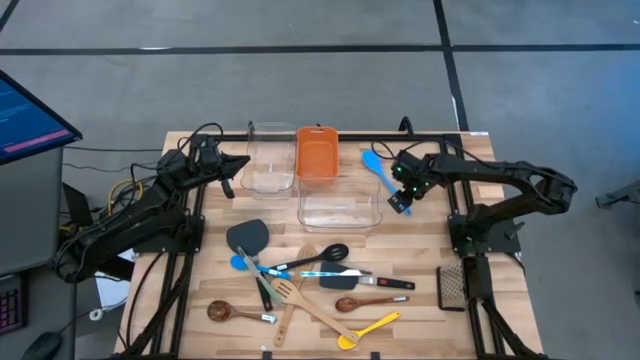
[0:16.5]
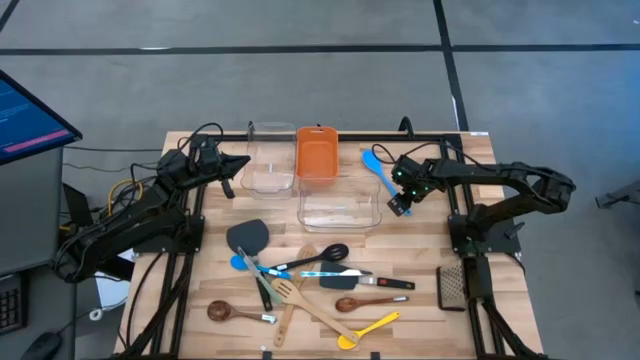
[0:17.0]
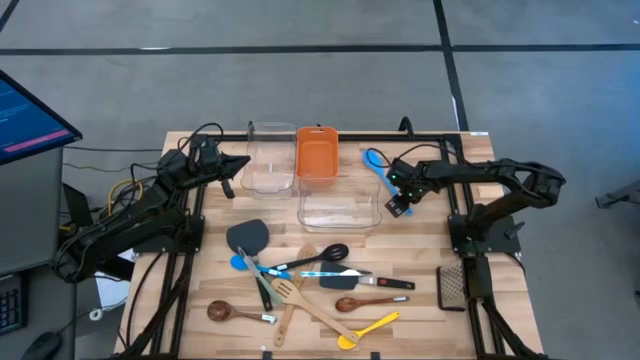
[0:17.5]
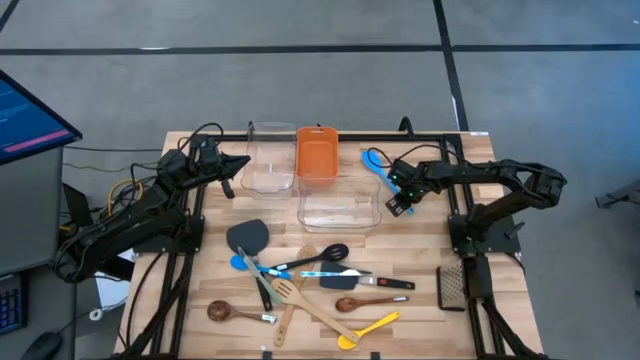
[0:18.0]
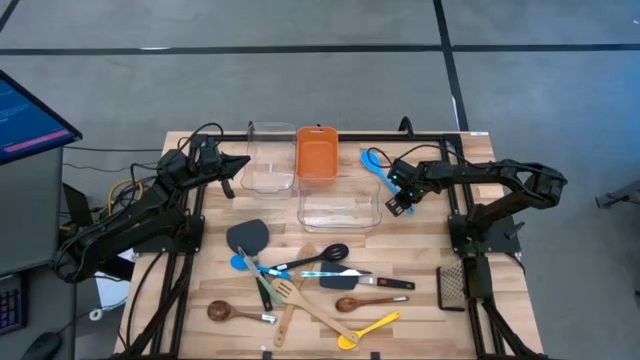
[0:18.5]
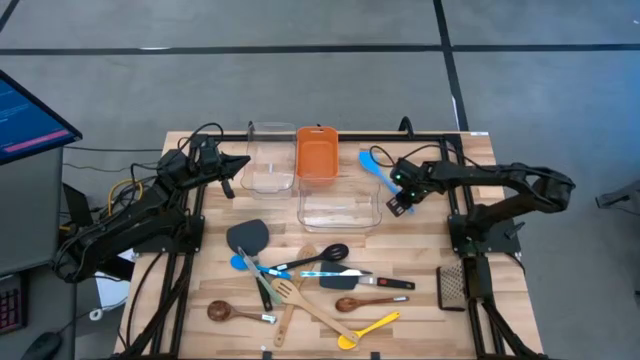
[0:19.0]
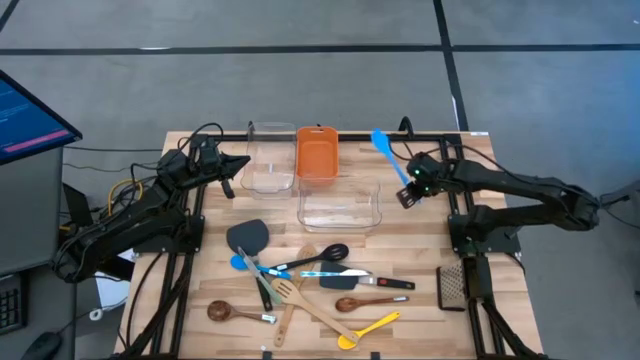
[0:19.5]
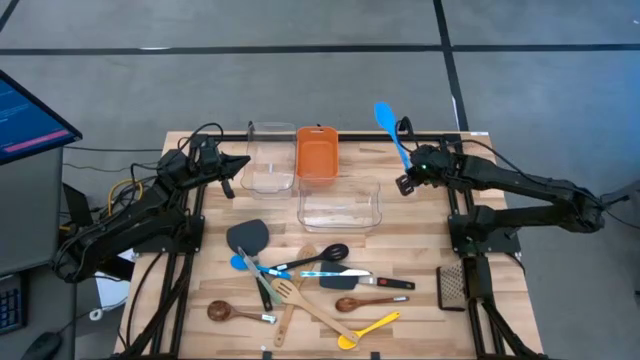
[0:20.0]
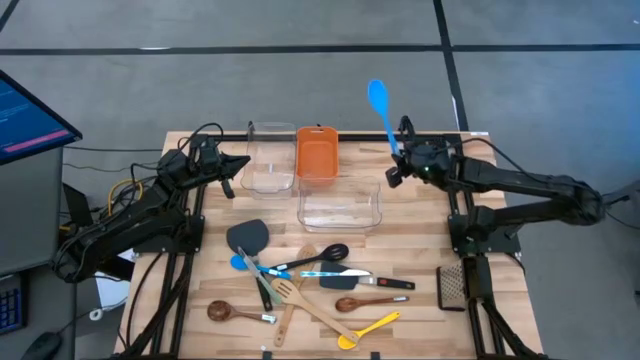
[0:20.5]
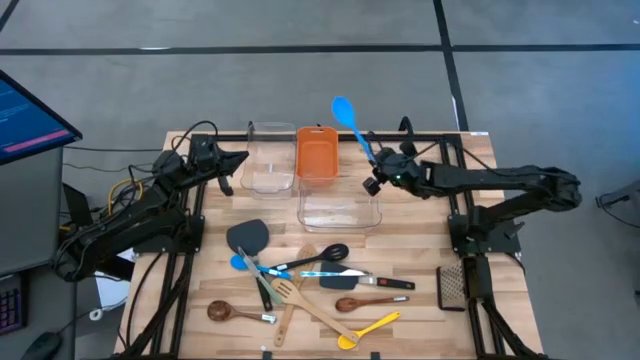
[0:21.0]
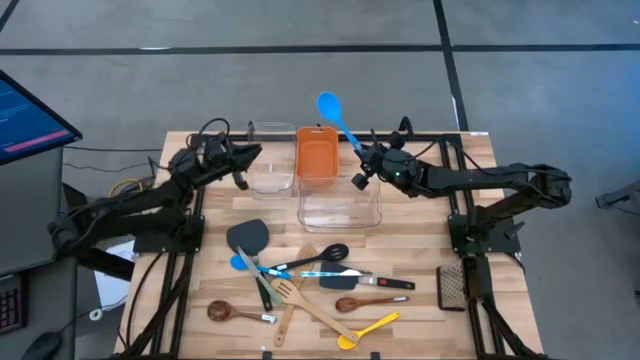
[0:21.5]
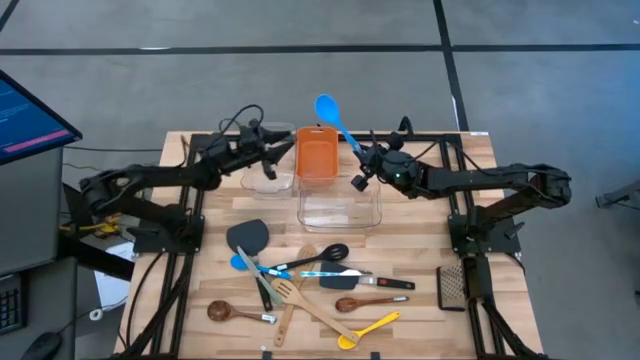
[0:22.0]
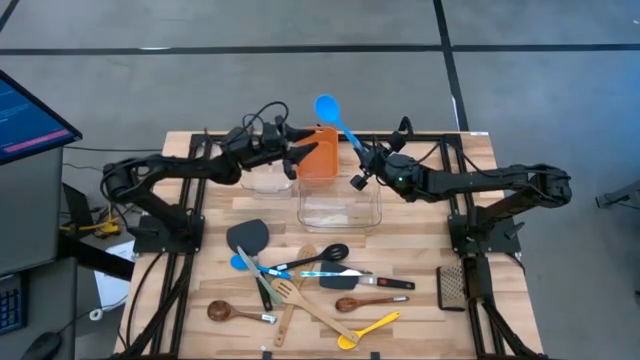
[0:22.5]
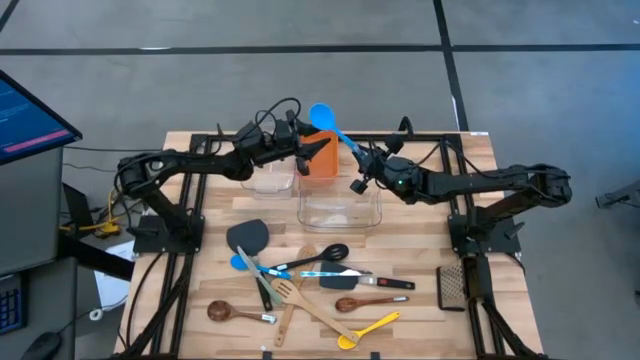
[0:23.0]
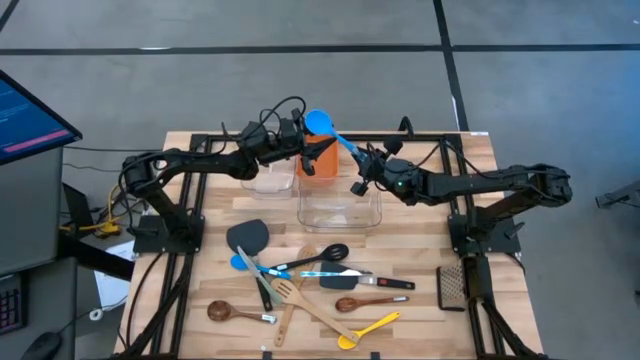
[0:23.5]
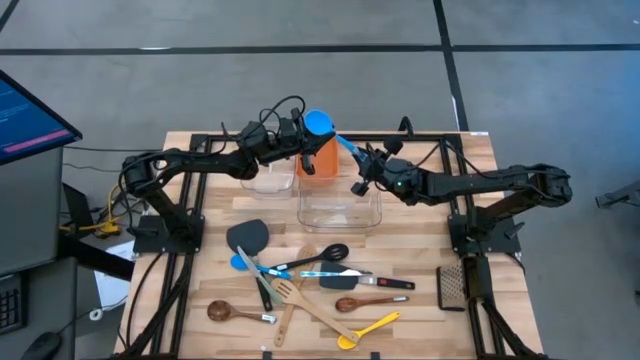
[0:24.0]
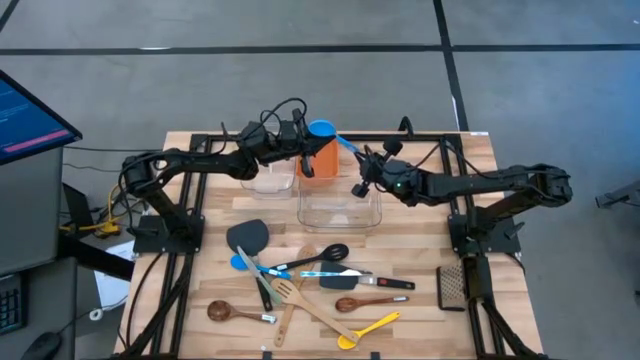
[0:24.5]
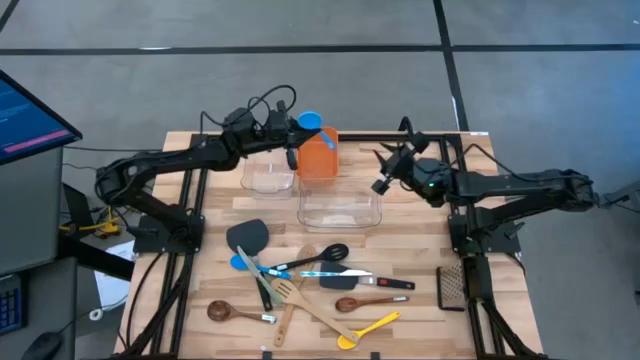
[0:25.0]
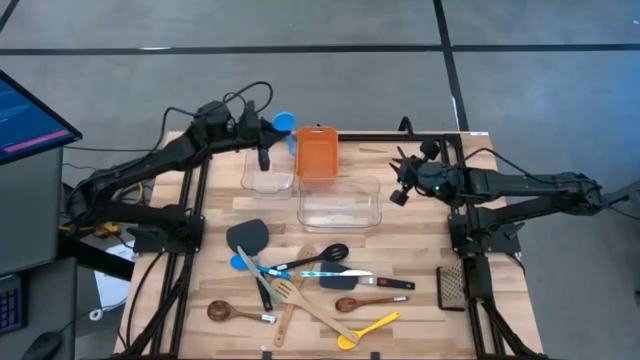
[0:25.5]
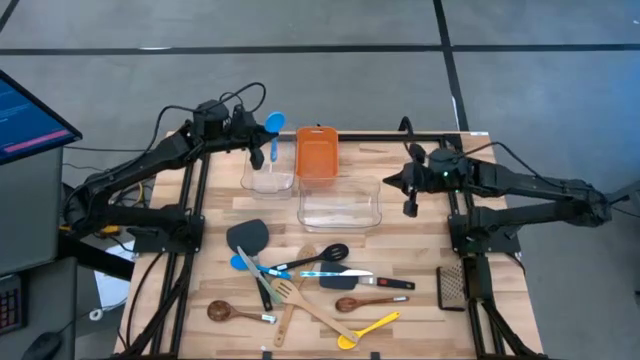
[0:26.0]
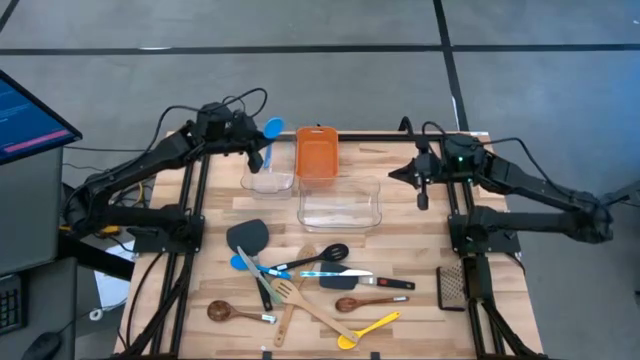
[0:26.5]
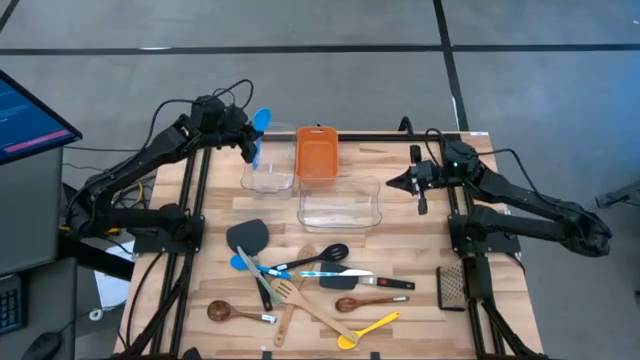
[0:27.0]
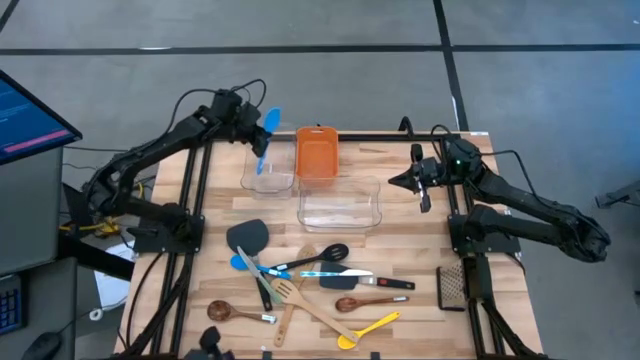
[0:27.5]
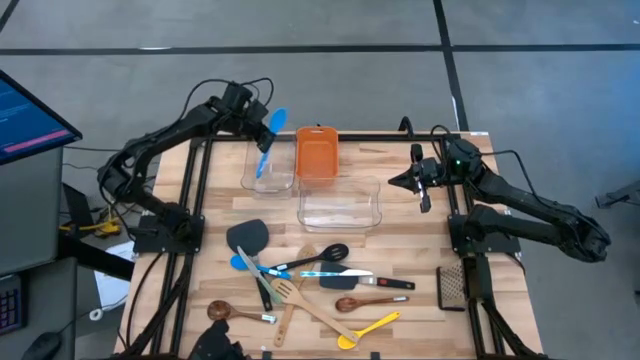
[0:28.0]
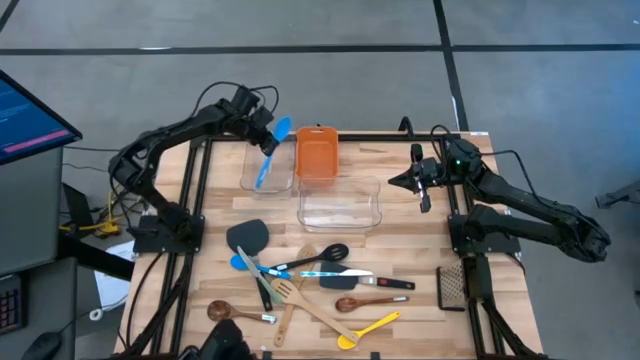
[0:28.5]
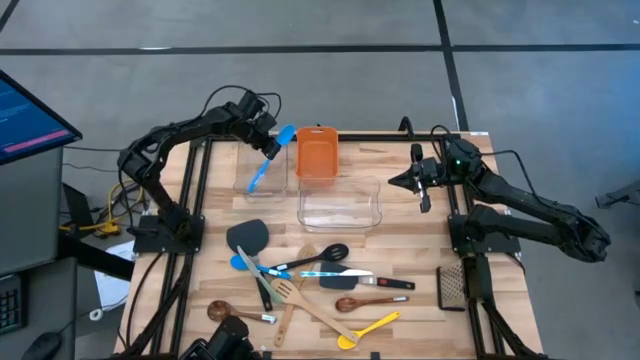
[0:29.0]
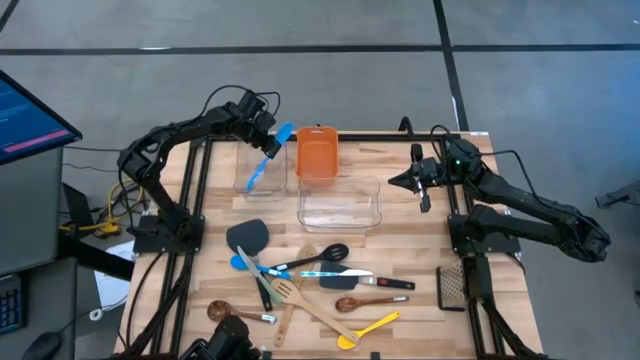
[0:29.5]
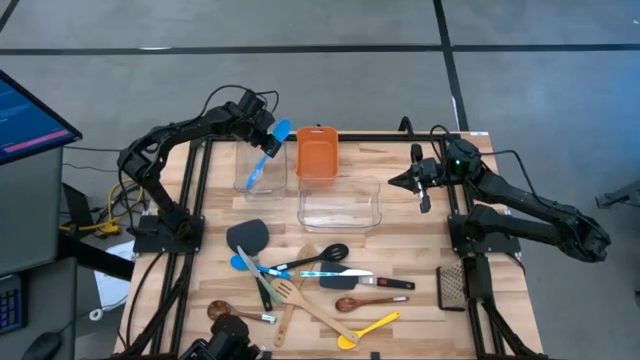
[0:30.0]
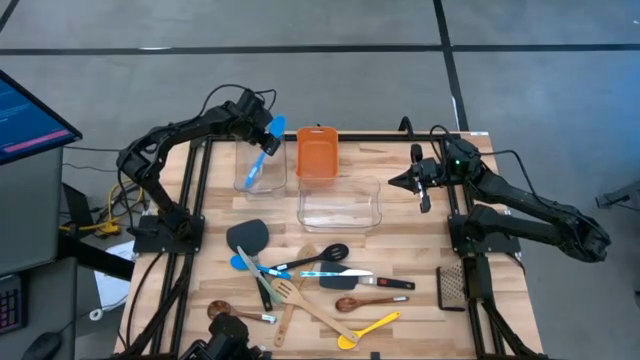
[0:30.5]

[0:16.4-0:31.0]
Task: Pick & Place Kitchen Items
Put the top blue serving spoon into the top transparent bin

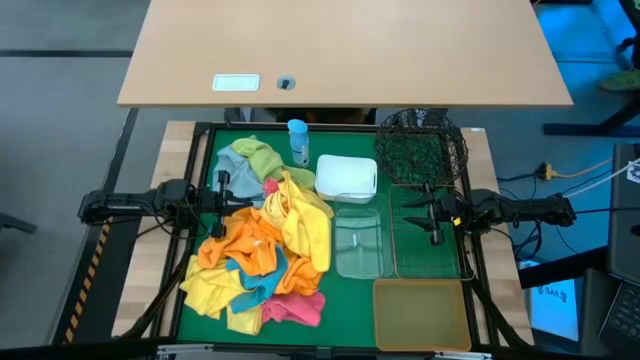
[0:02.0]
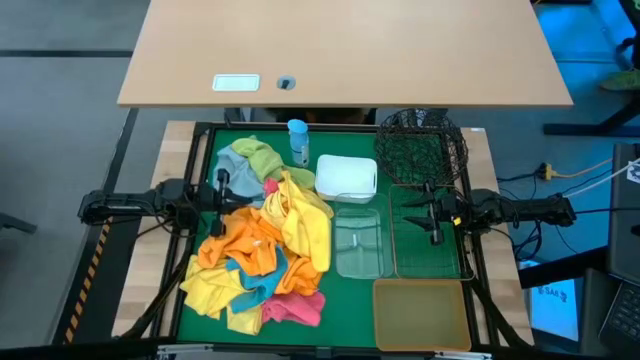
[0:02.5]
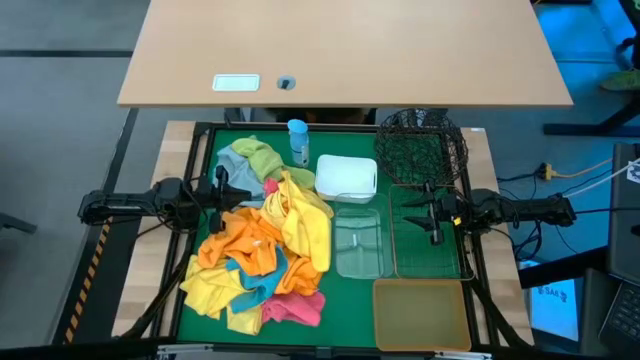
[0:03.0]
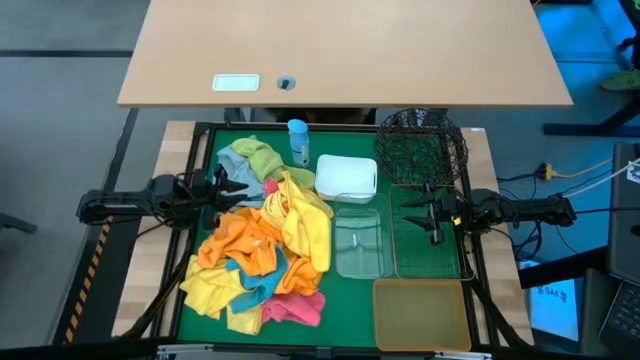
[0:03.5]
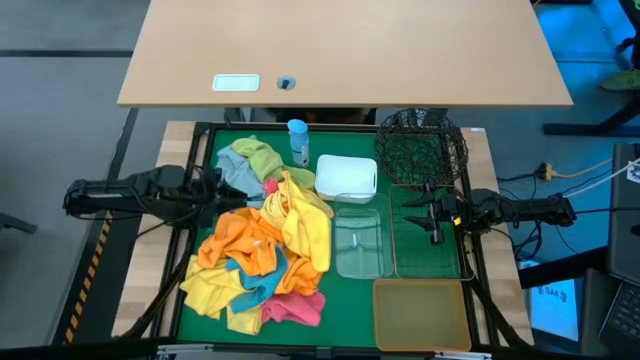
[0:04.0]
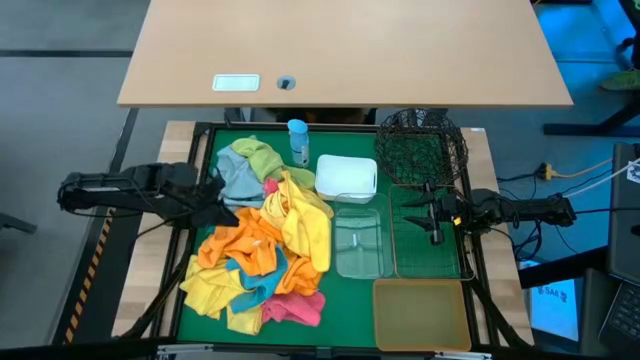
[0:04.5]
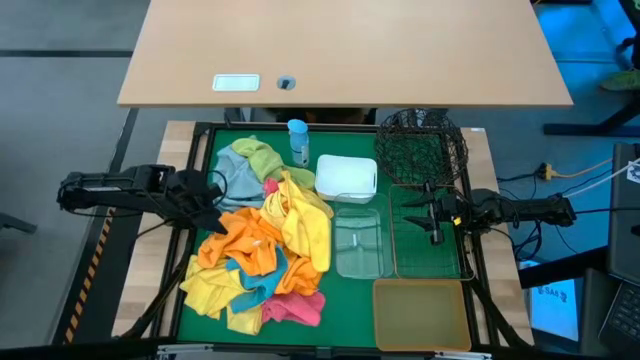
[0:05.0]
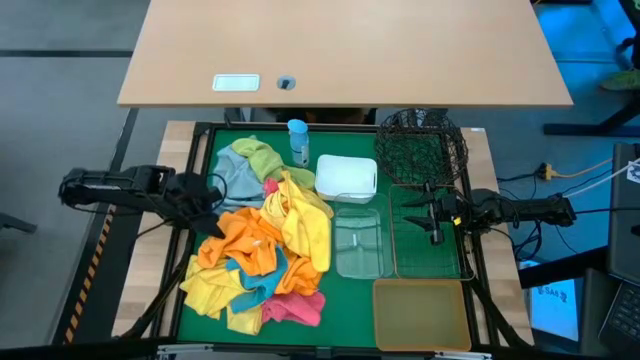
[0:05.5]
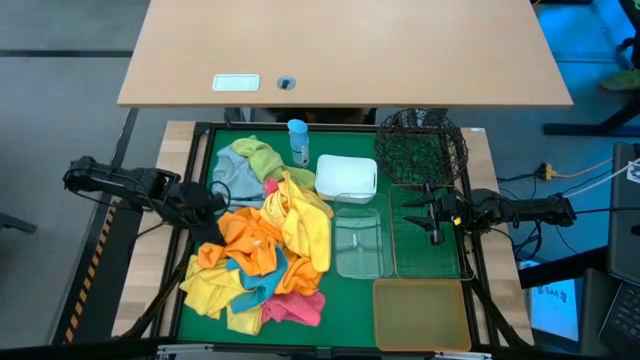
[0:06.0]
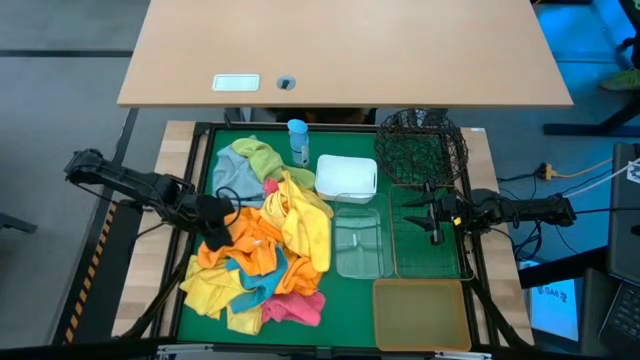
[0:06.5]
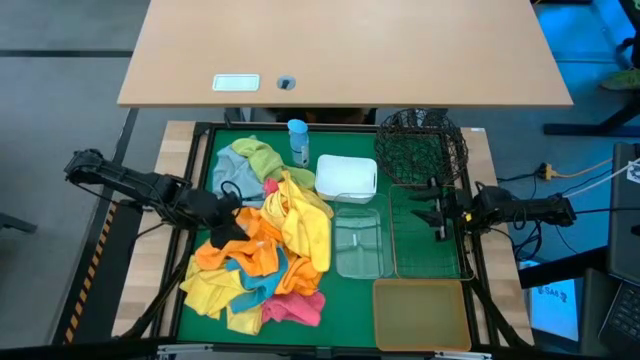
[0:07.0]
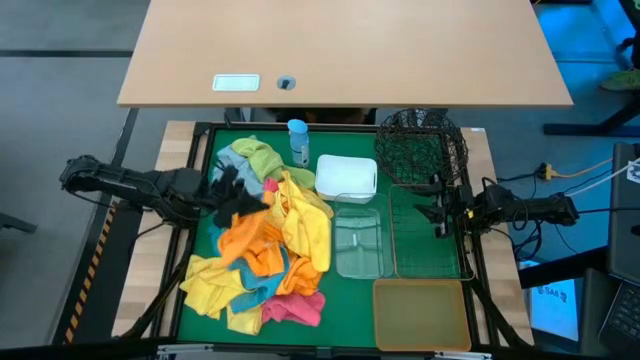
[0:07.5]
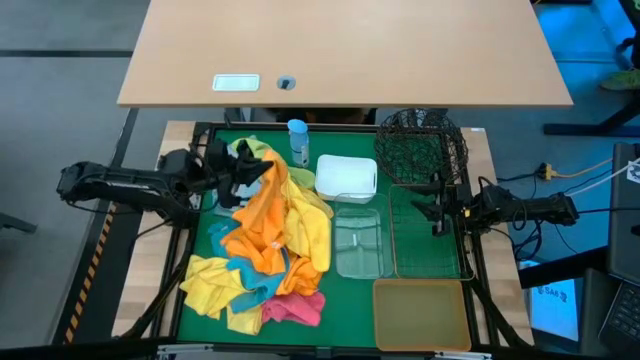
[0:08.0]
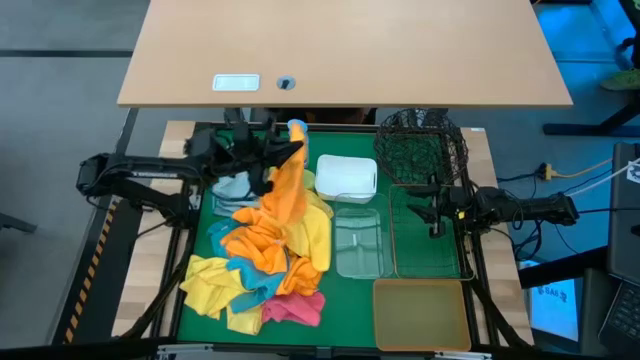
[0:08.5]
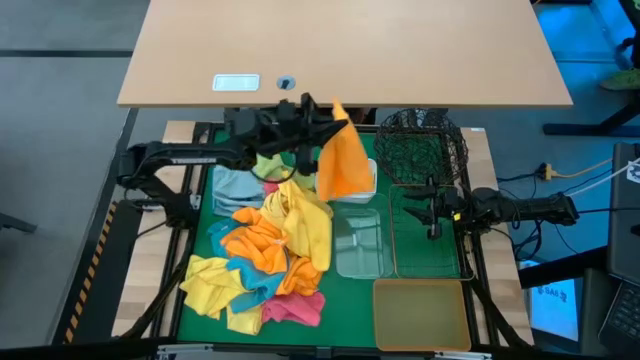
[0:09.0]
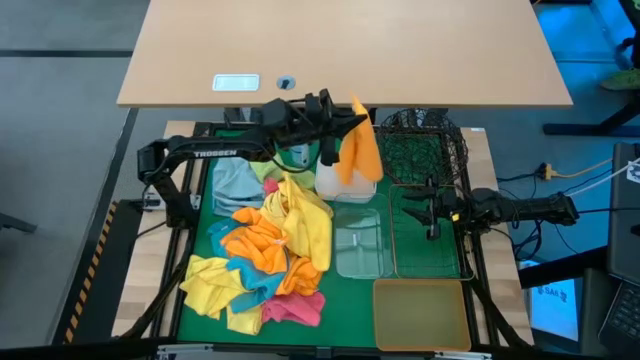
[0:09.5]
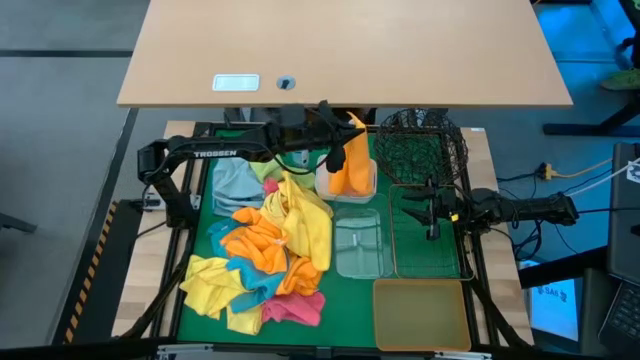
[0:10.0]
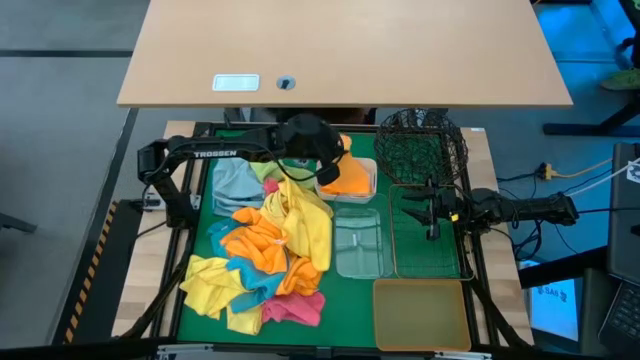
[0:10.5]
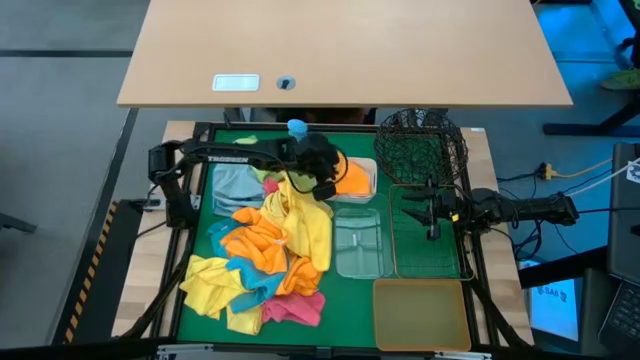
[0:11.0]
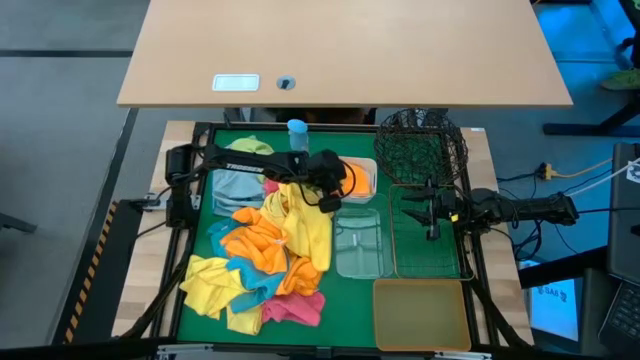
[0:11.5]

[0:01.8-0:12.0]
Task: Sort microfiber towel by color & place in baskets
Put the orange towel into the white bin
